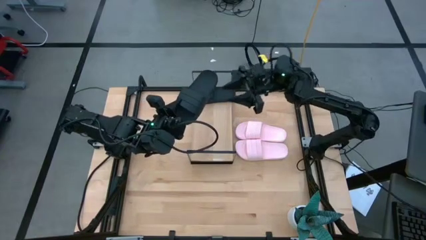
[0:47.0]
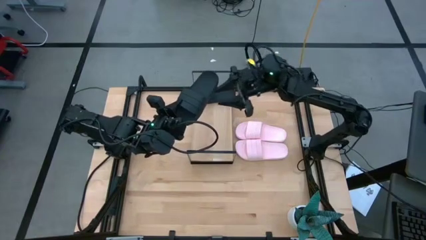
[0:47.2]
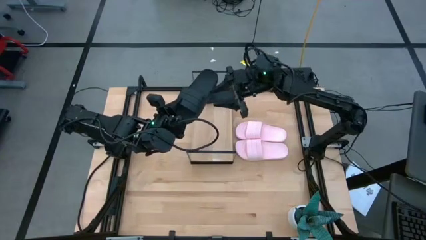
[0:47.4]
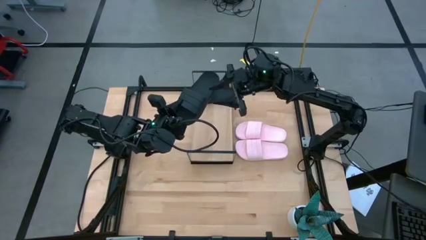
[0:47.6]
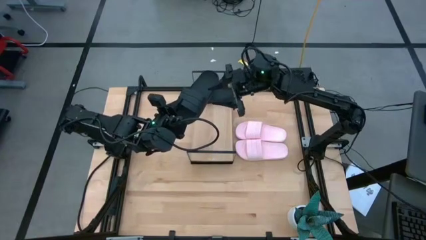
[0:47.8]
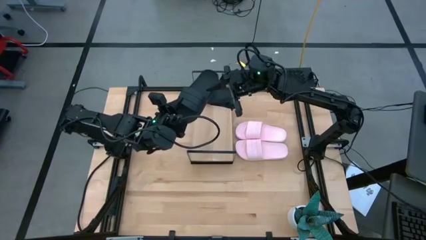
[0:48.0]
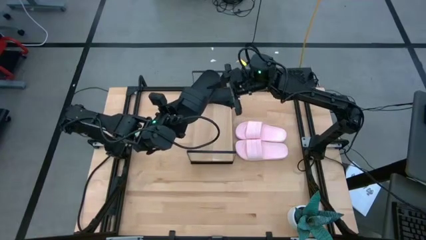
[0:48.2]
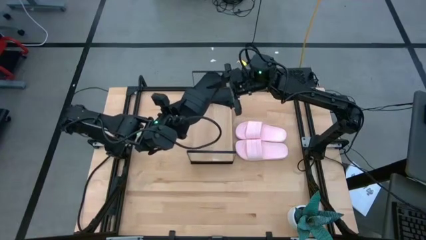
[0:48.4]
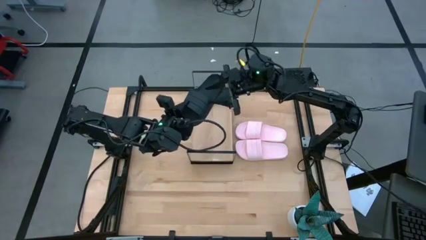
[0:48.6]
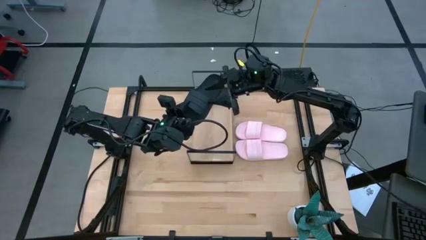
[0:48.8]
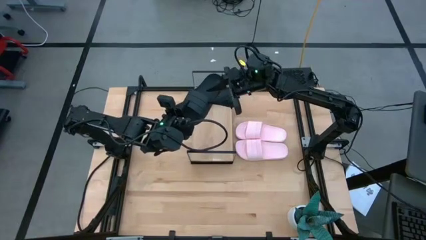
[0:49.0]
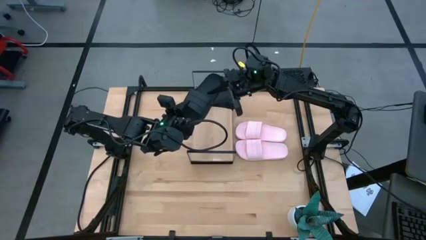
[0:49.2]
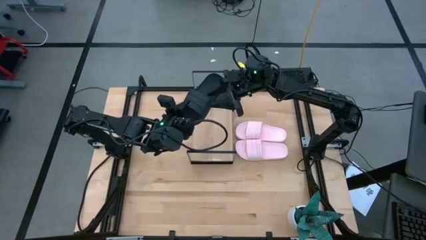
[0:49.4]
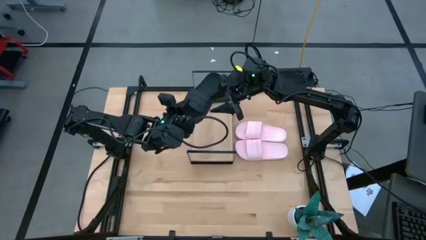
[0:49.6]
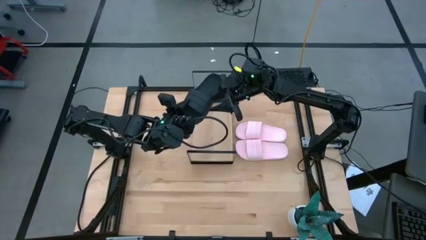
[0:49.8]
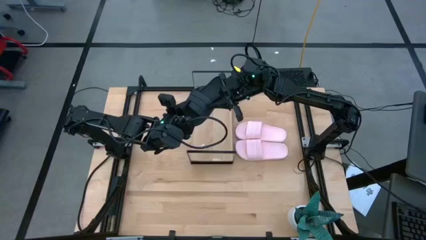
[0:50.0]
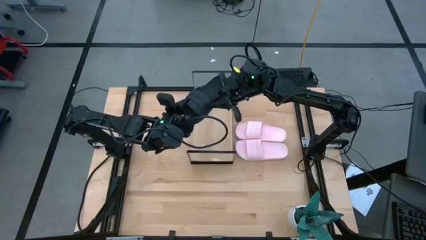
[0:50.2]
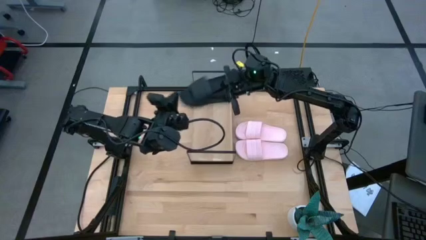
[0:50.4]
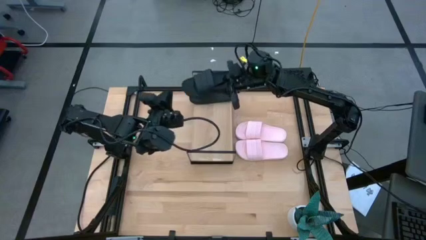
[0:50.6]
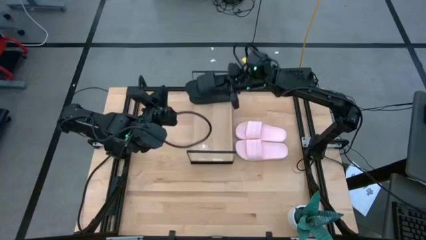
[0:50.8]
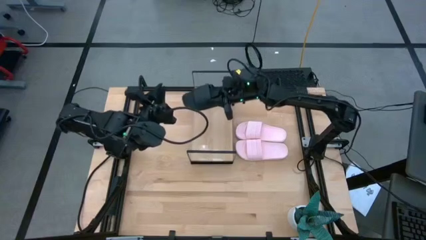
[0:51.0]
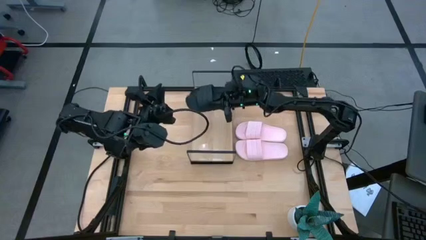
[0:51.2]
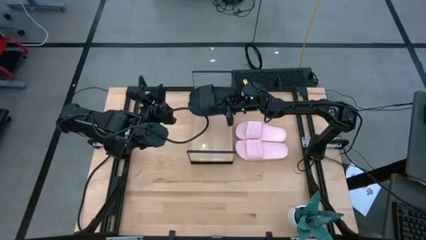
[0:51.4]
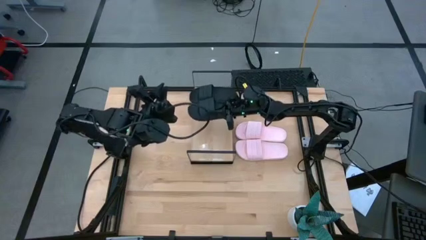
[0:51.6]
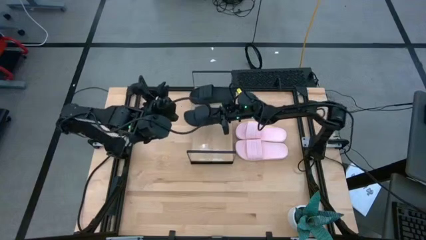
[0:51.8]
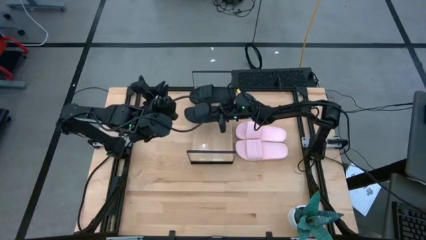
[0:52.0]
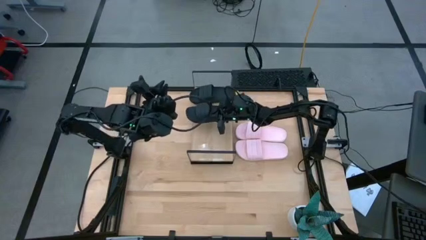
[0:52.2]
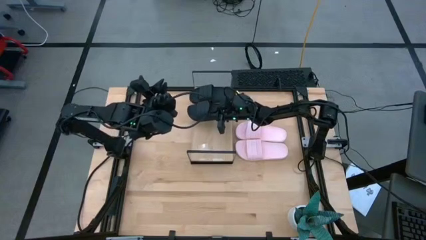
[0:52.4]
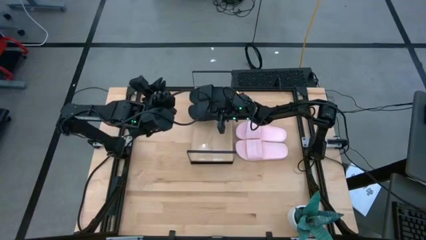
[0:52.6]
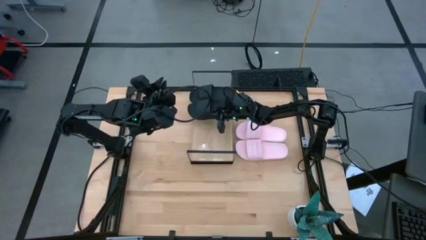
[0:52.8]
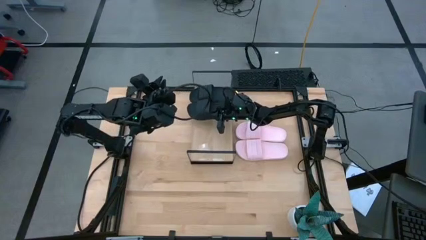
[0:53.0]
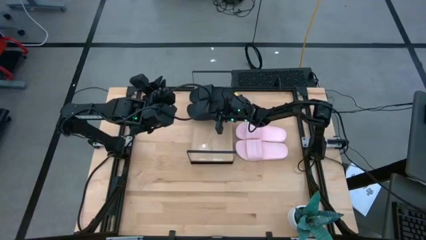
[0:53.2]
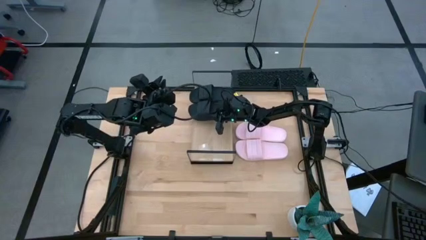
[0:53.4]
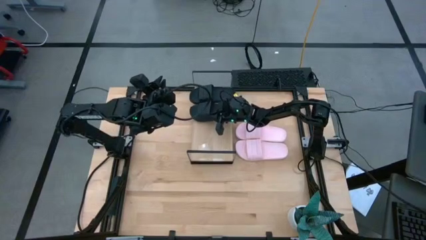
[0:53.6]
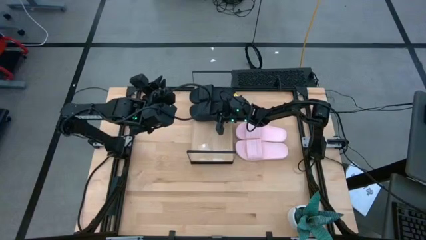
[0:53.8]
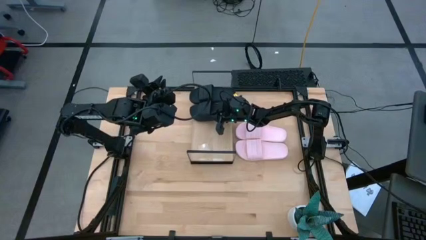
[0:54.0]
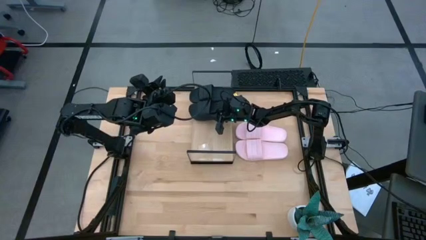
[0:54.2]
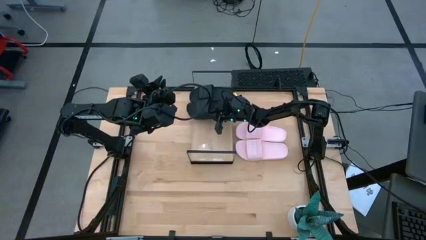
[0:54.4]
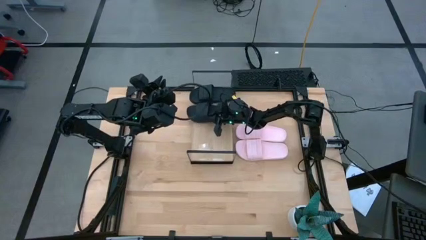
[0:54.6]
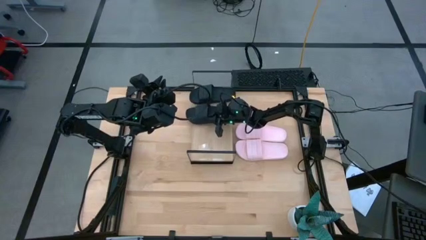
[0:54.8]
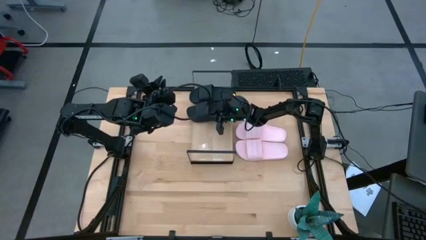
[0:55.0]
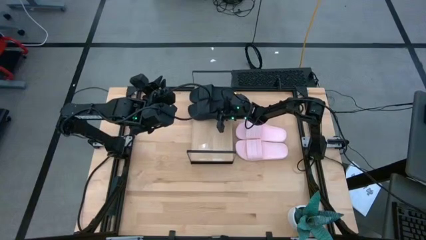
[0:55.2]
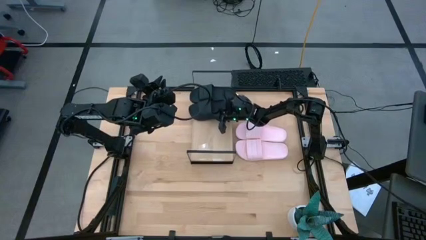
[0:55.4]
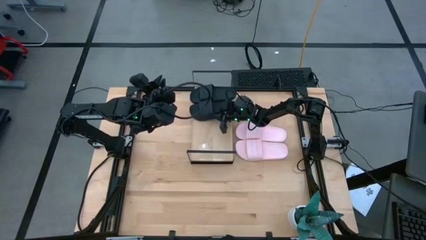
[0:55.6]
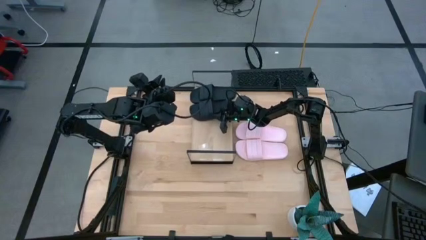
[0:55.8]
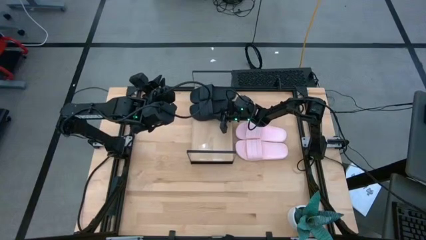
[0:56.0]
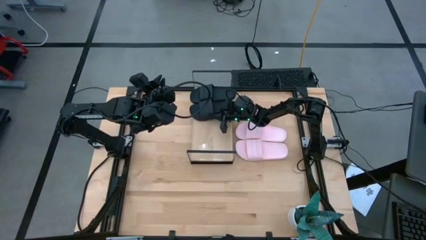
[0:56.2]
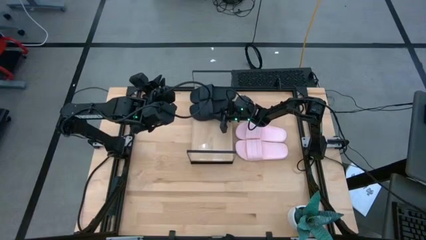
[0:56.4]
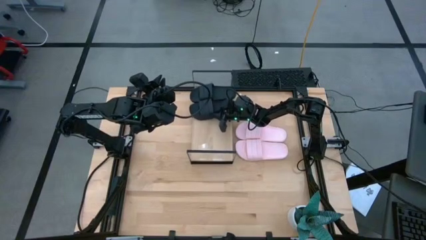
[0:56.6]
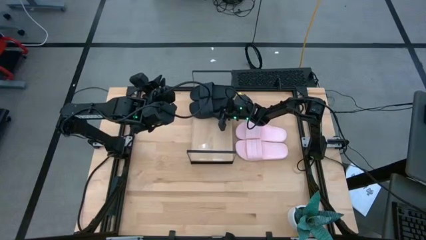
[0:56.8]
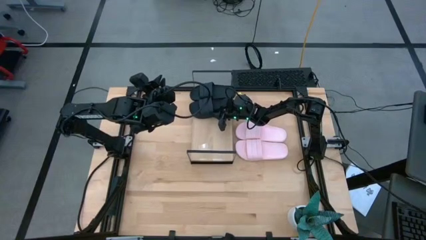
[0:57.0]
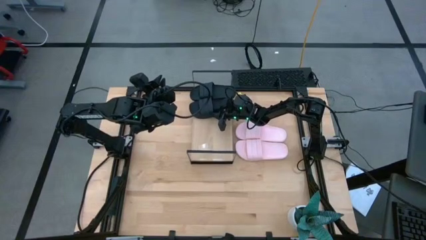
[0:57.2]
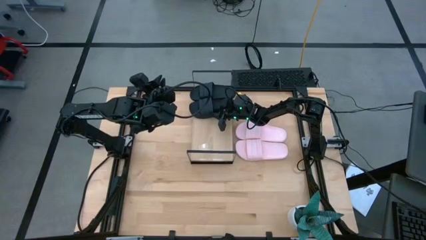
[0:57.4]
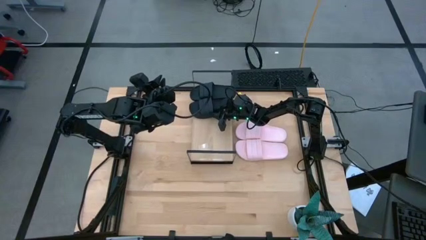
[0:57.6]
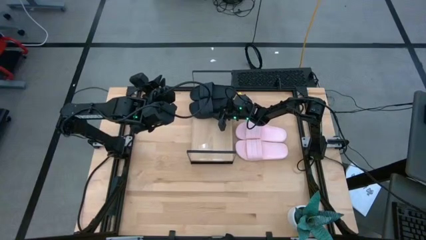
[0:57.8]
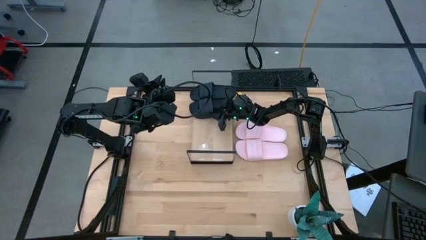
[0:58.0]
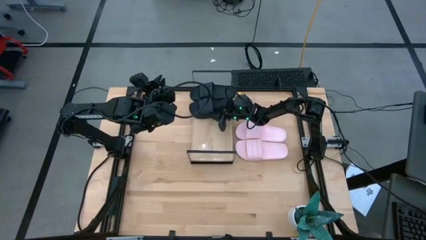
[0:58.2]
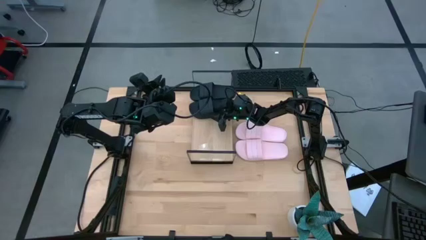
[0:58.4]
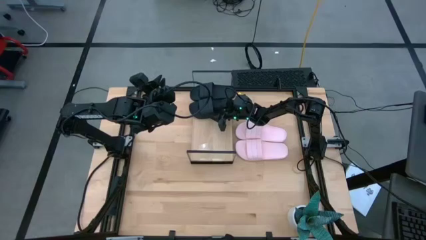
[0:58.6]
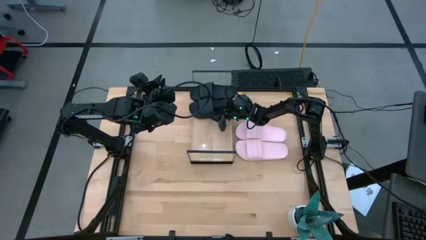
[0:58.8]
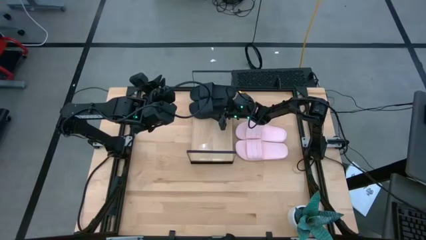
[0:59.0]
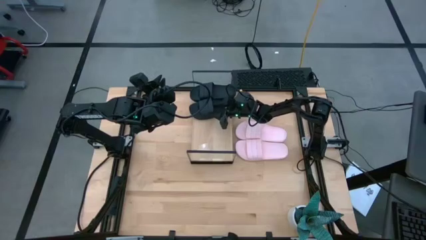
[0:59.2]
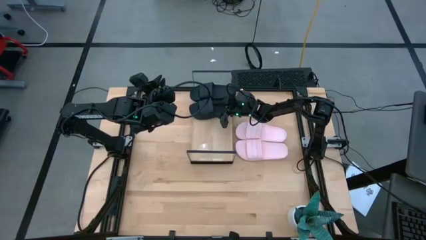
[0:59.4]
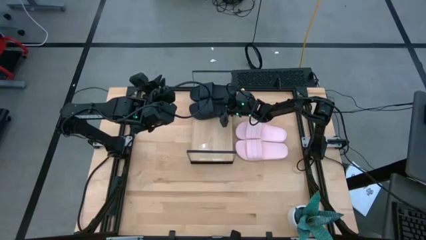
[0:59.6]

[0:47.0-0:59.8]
Task: Pick and place slides into the shelf
Put the black slide on the shelf
